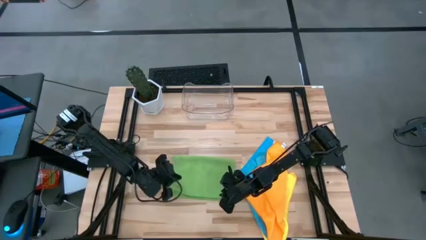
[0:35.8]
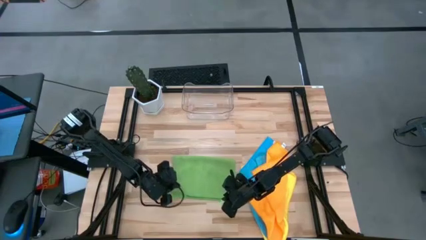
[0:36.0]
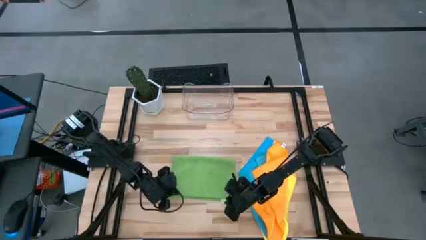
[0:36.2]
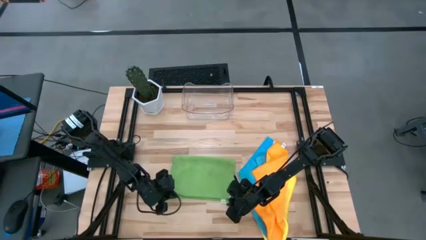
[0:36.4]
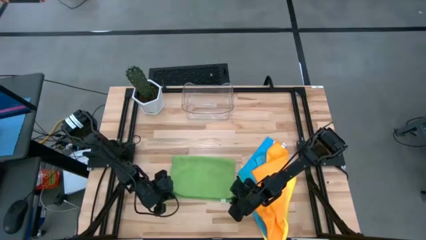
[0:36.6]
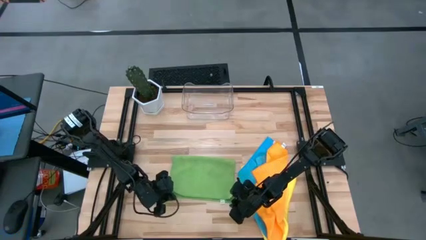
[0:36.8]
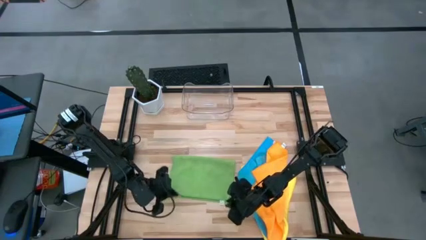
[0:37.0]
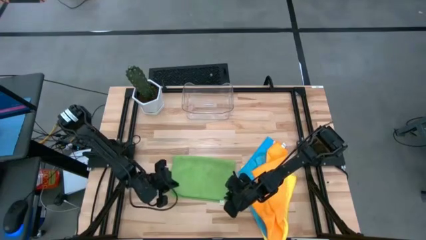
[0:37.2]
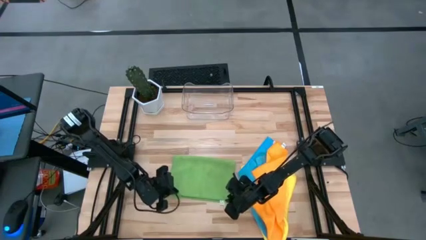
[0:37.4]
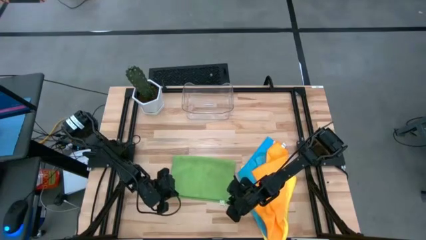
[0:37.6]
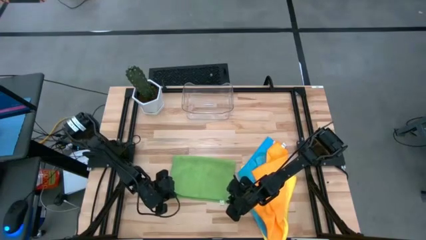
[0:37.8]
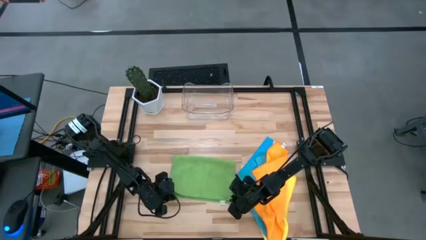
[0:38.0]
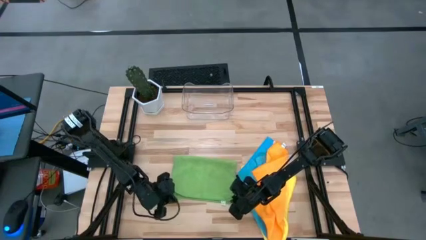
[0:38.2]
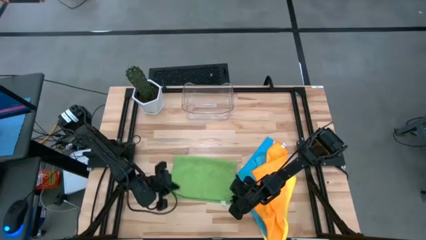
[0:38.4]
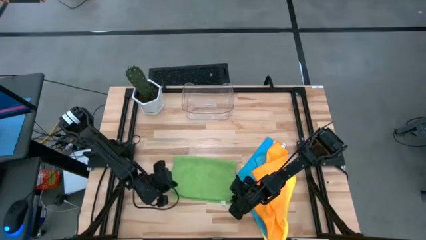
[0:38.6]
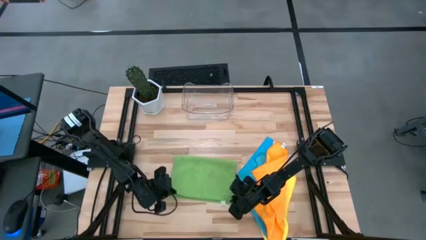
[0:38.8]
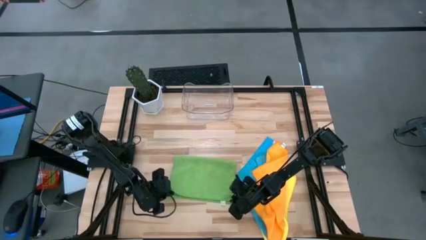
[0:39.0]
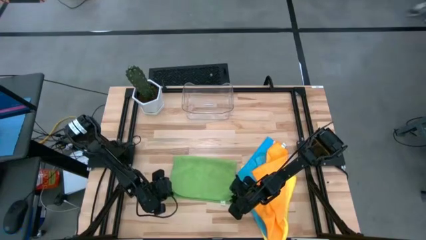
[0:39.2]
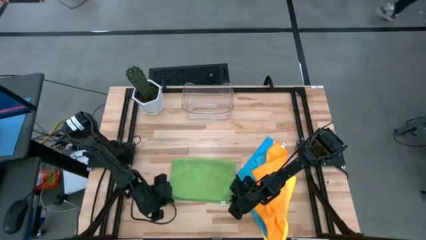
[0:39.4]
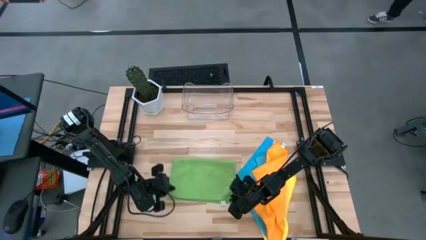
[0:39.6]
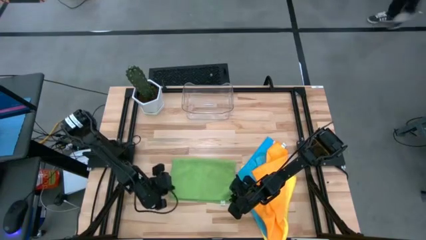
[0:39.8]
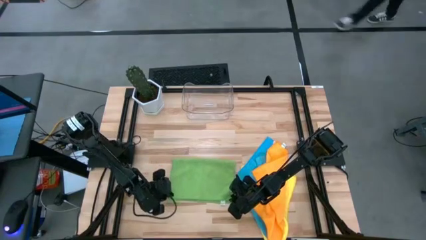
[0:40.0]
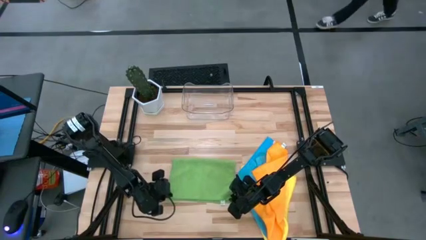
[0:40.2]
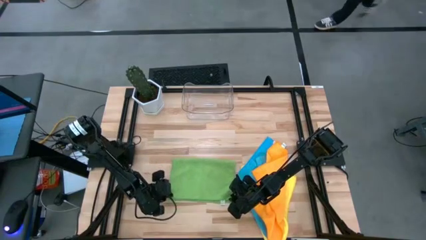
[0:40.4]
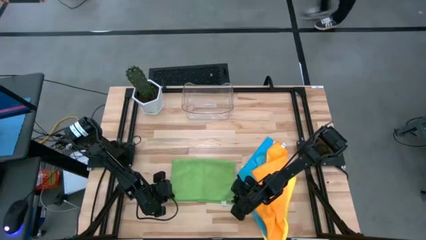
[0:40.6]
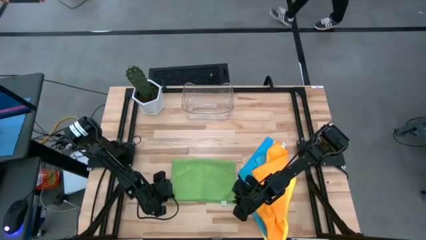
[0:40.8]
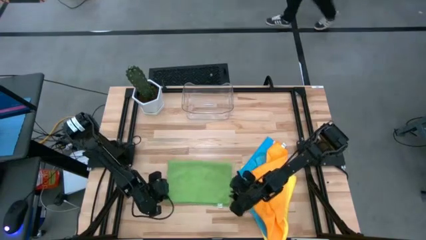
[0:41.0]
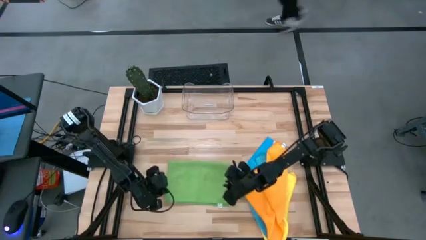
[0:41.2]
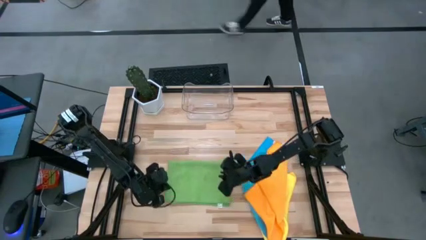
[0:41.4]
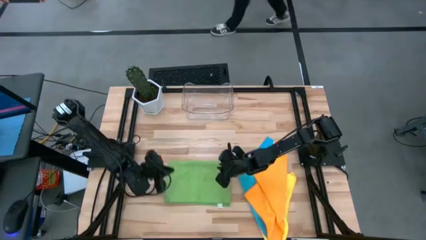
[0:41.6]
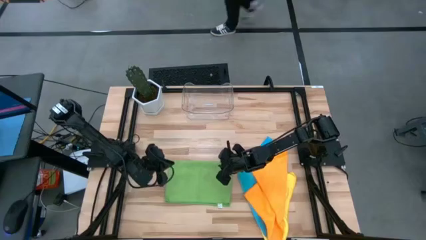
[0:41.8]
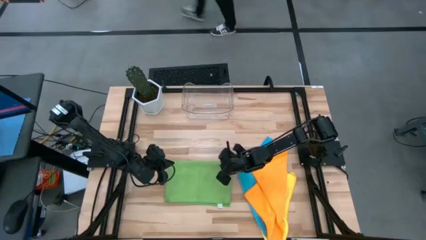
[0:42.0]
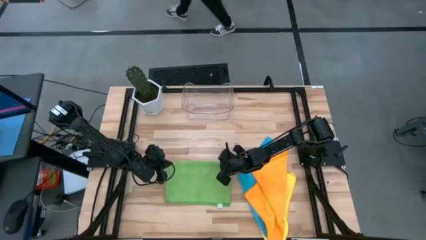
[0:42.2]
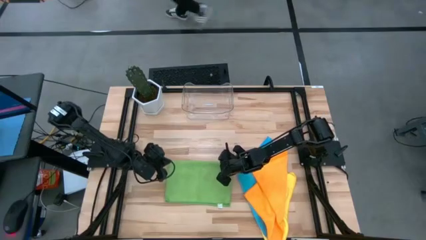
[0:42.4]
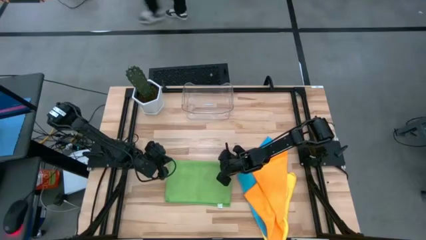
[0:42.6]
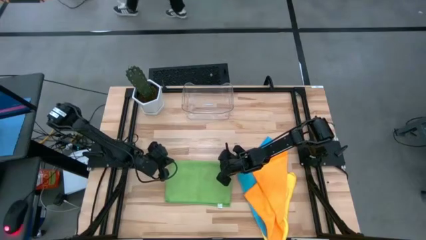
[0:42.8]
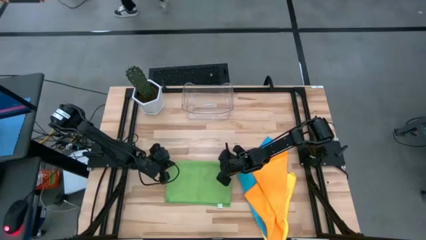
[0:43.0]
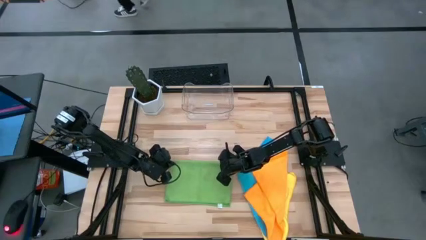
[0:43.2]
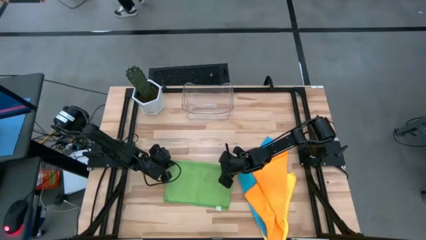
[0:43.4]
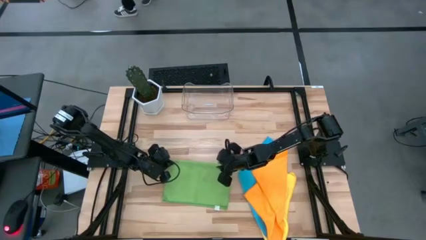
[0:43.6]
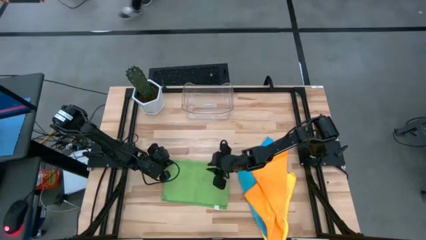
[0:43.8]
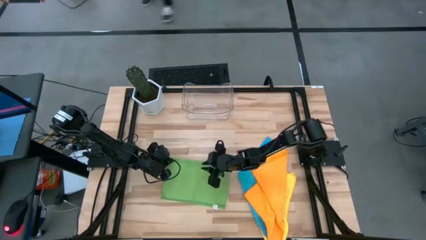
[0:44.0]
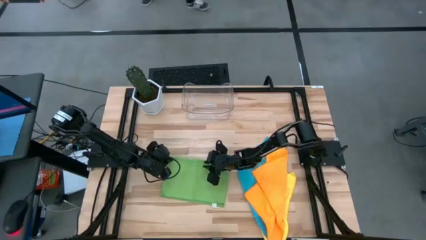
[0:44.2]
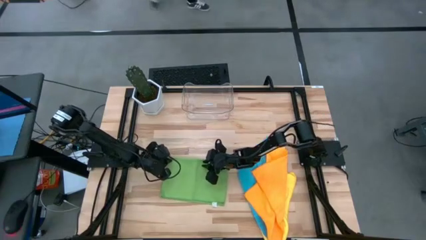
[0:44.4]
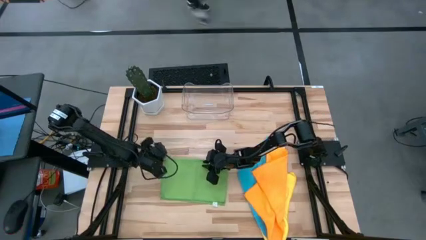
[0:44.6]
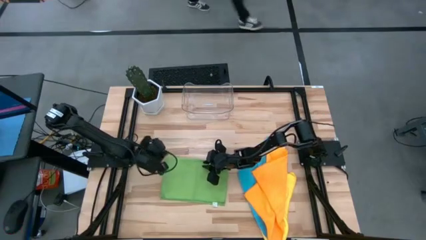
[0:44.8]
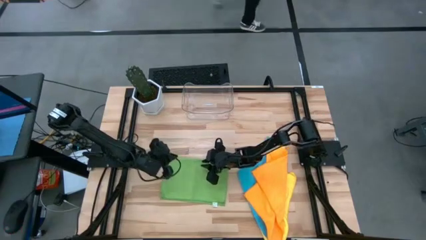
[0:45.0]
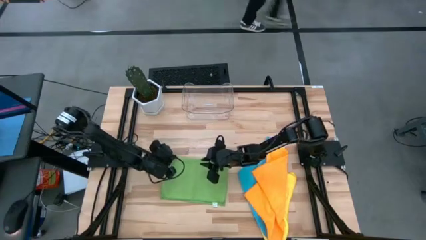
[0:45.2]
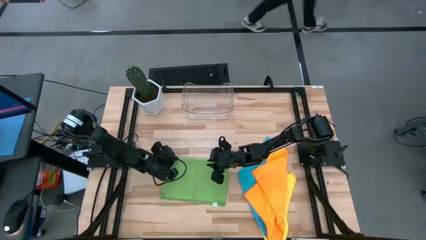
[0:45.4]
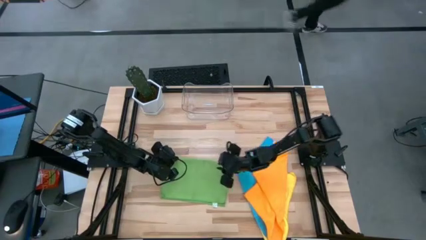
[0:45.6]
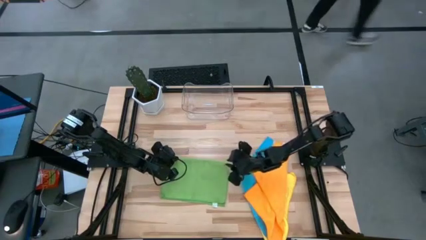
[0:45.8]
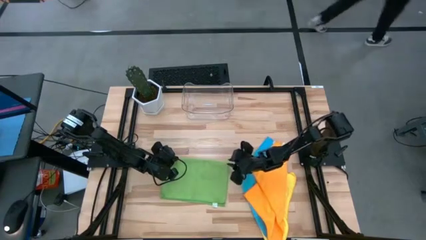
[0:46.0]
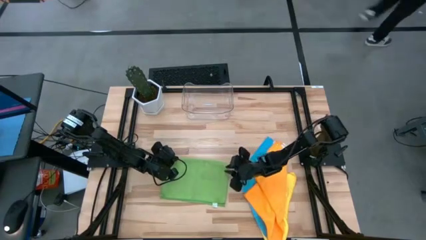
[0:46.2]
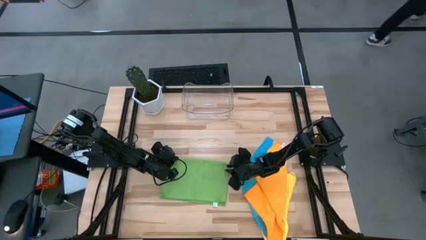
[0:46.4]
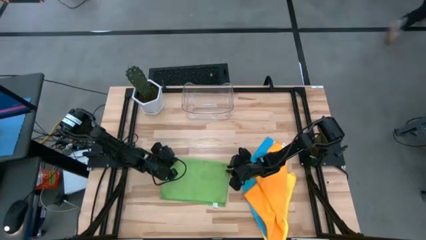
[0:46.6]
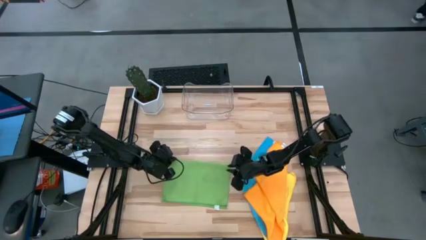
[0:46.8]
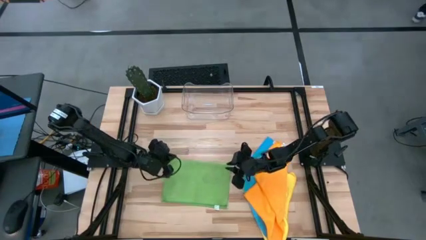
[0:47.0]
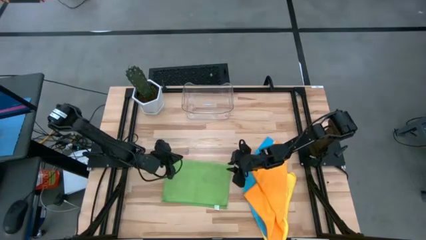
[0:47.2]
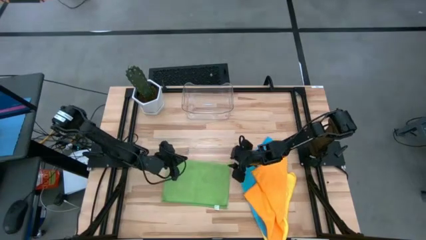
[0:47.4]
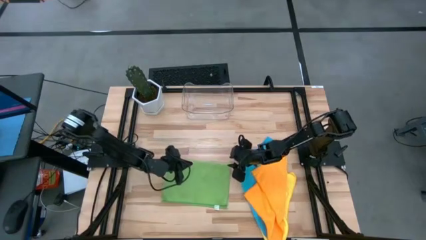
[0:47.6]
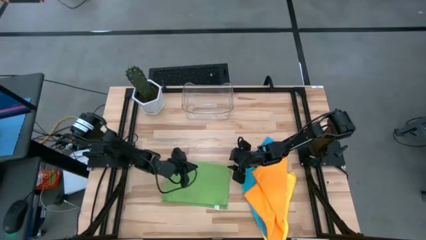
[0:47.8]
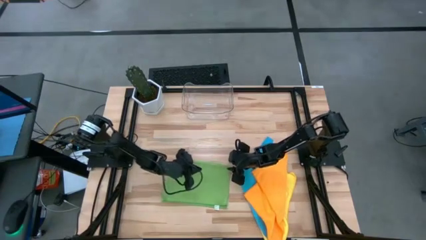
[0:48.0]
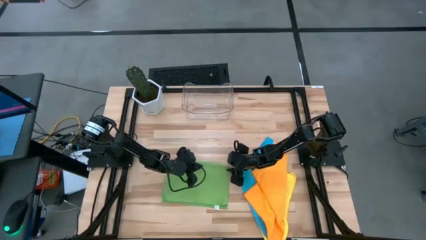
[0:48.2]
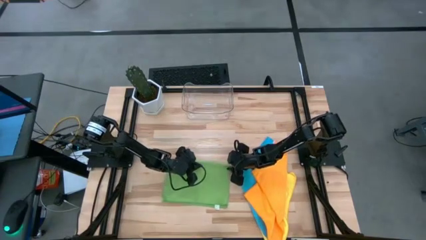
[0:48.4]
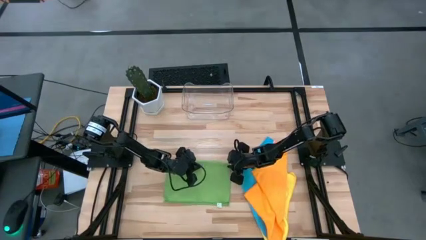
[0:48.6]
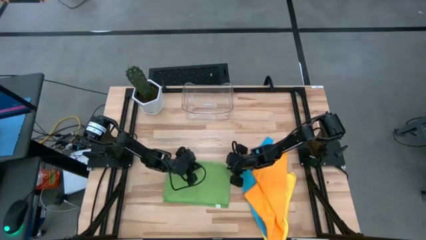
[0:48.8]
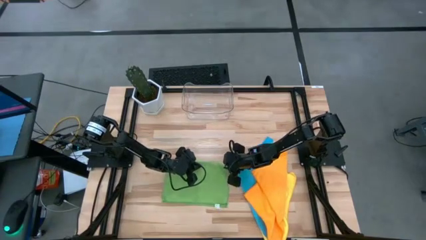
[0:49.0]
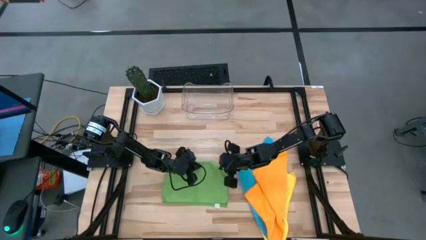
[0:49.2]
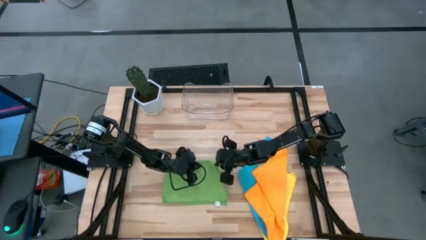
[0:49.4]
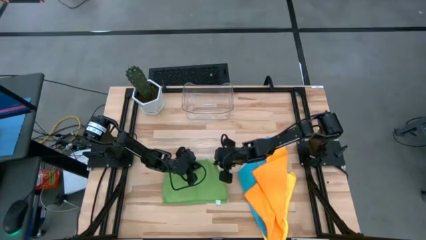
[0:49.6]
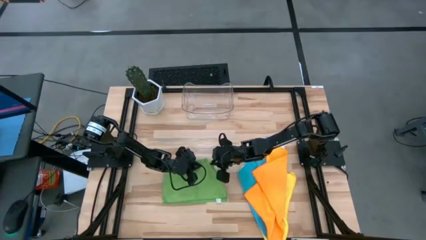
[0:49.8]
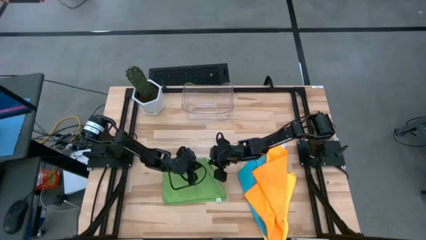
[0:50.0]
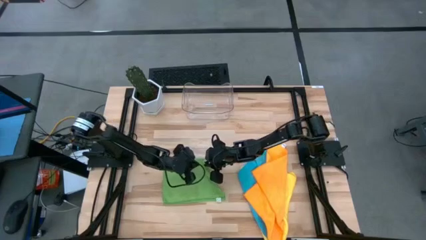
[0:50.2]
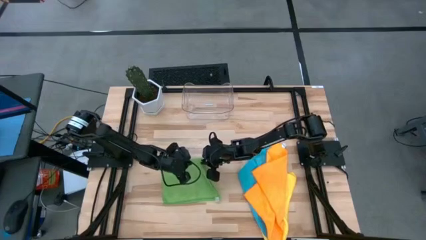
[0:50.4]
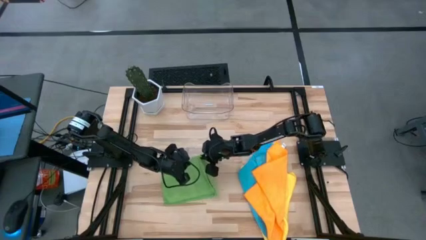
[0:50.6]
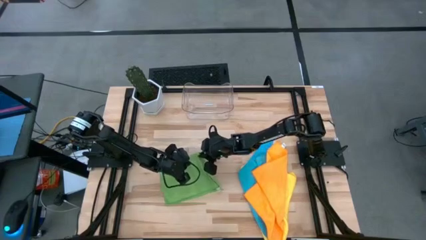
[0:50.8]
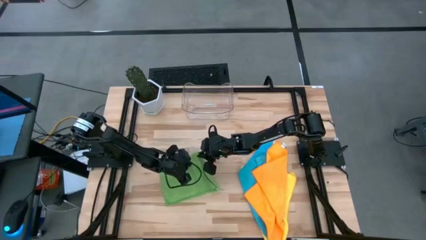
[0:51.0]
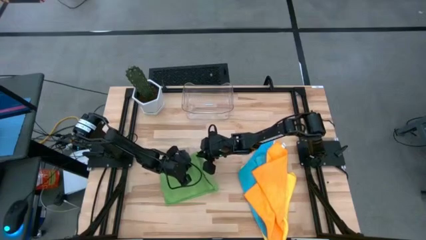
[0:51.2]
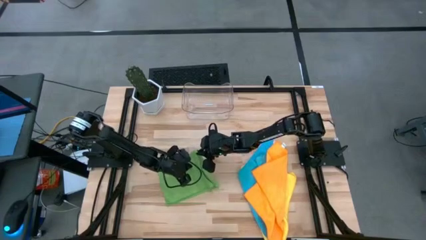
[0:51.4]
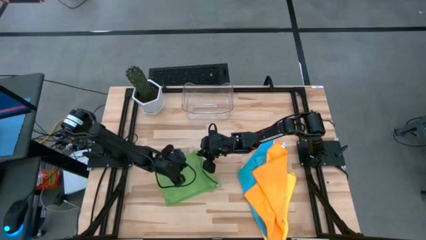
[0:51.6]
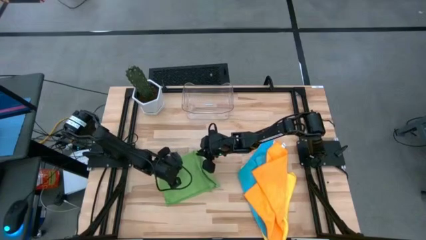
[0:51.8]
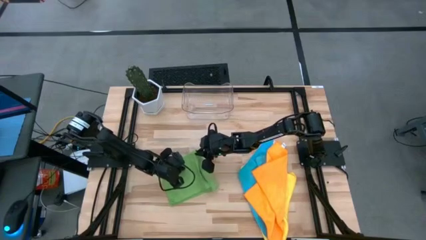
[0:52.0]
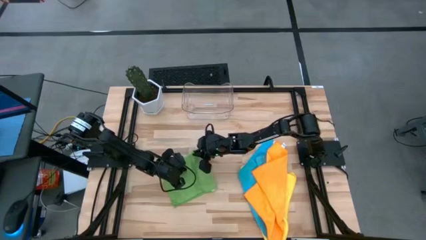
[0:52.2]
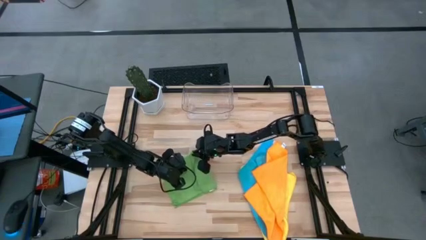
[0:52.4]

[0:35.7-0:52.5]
Task: Fold microfiber towels
Fold the green towel
